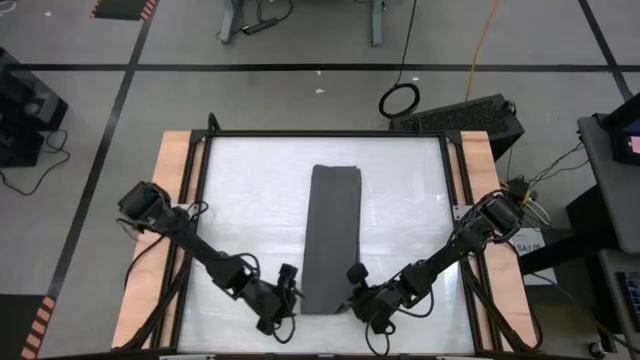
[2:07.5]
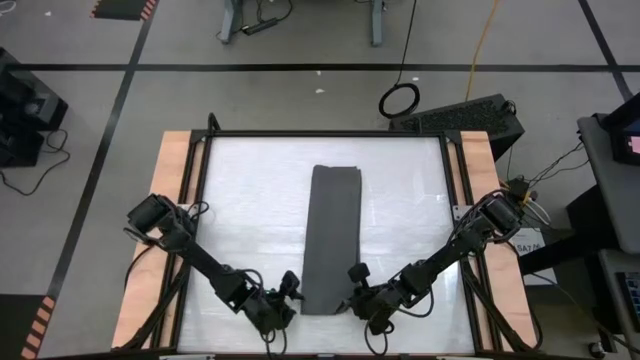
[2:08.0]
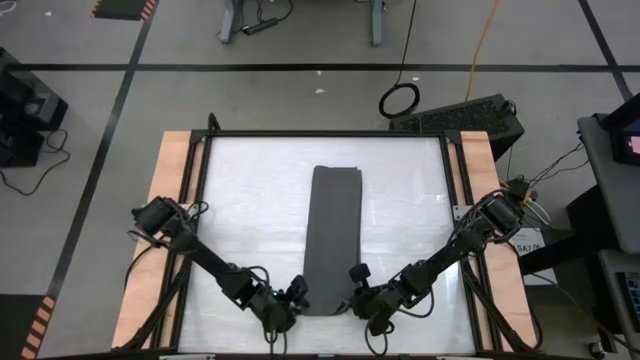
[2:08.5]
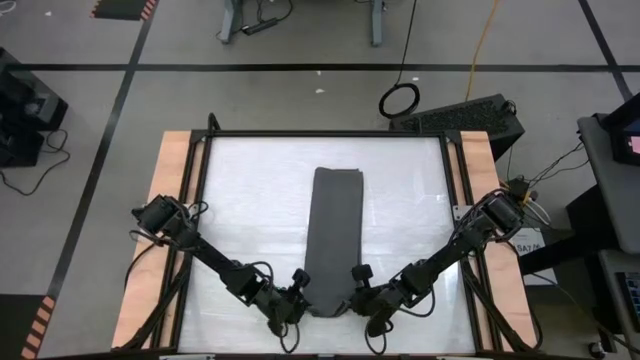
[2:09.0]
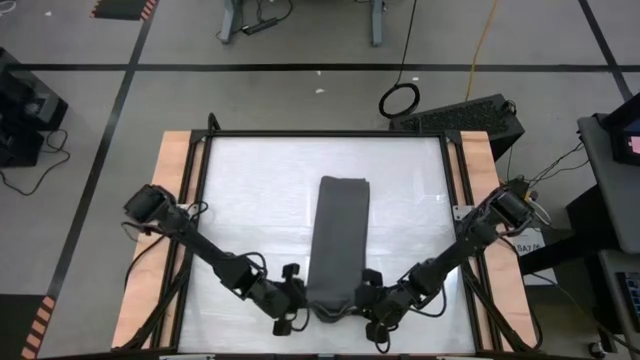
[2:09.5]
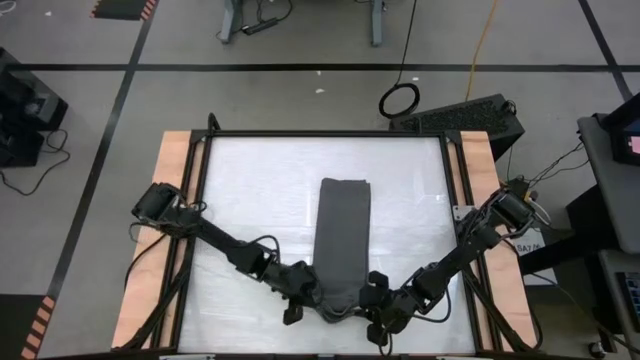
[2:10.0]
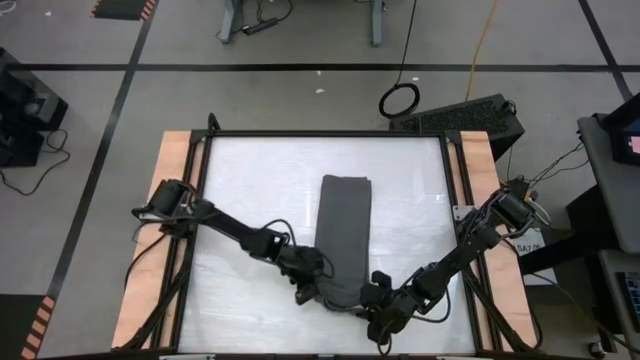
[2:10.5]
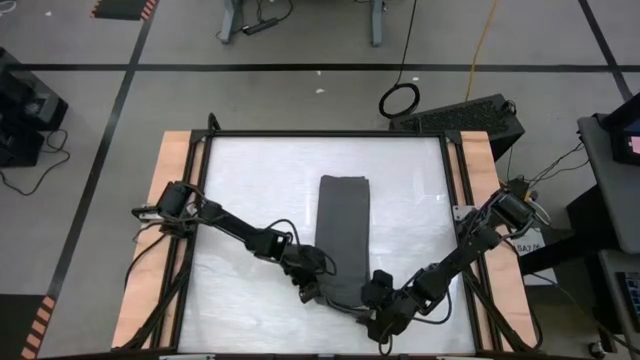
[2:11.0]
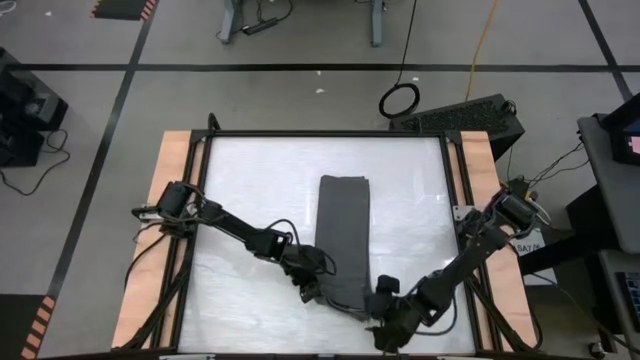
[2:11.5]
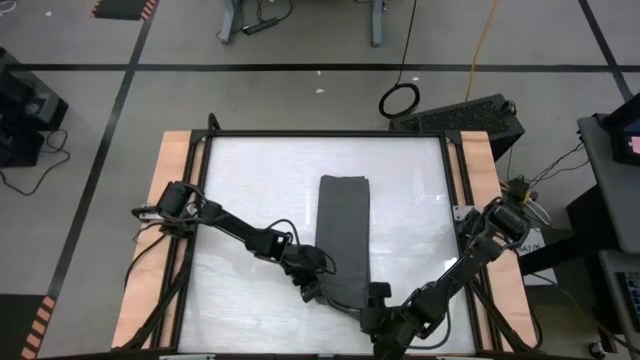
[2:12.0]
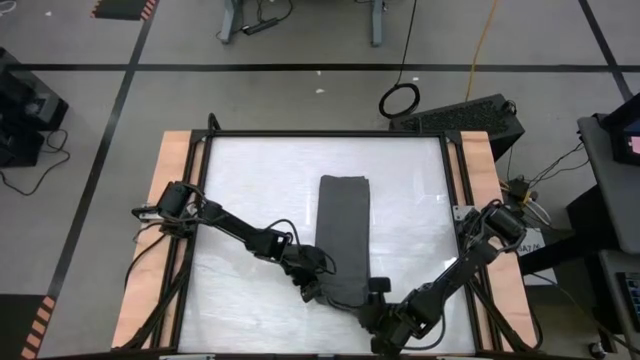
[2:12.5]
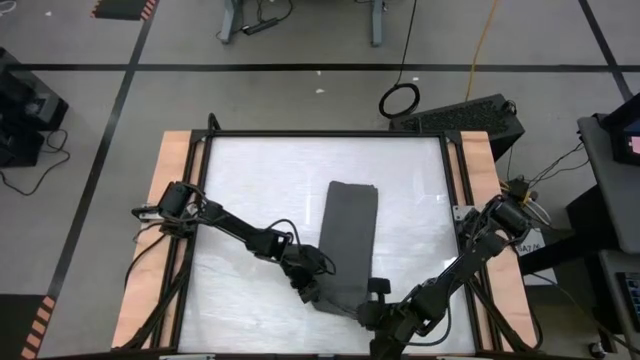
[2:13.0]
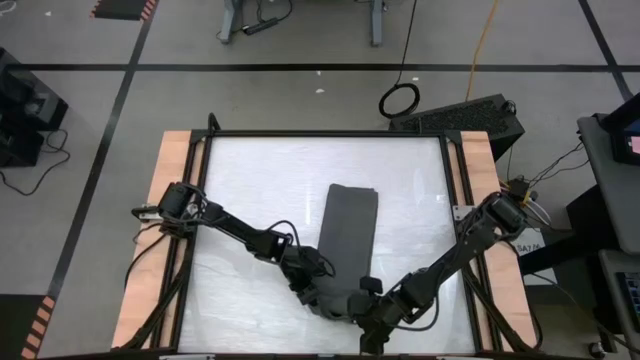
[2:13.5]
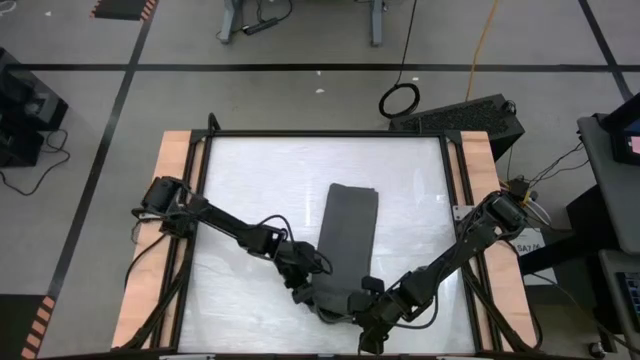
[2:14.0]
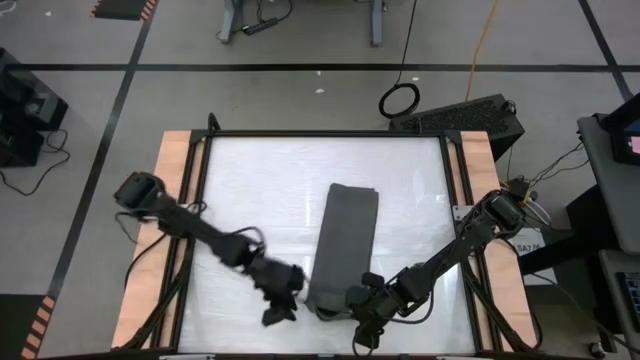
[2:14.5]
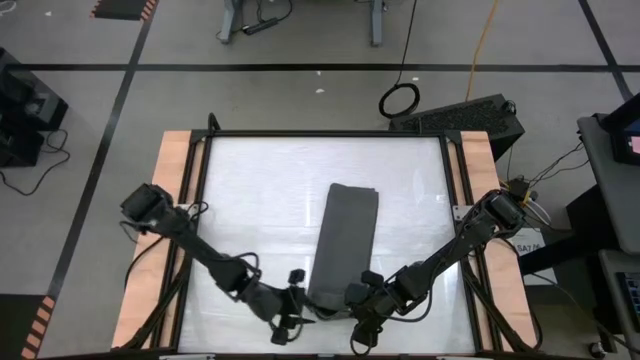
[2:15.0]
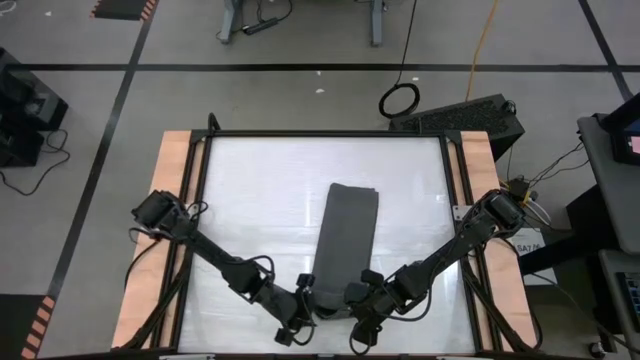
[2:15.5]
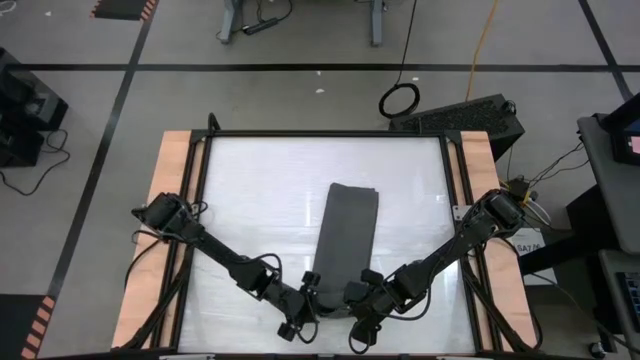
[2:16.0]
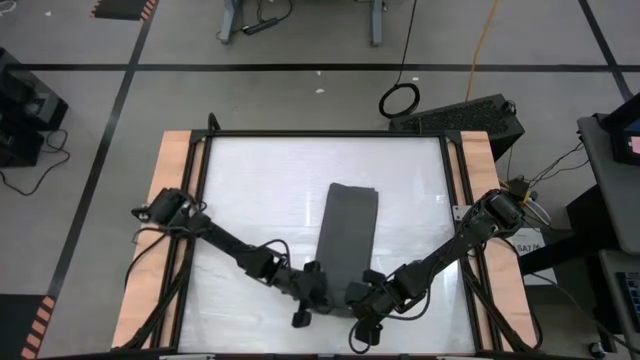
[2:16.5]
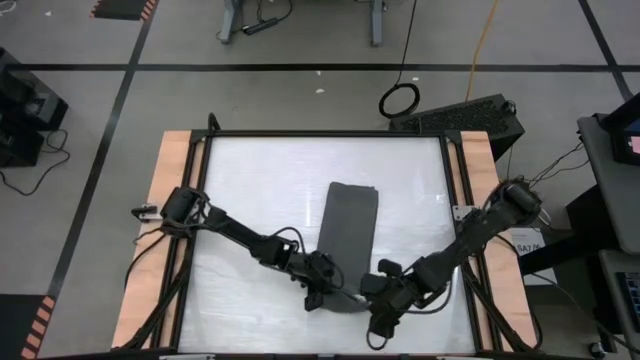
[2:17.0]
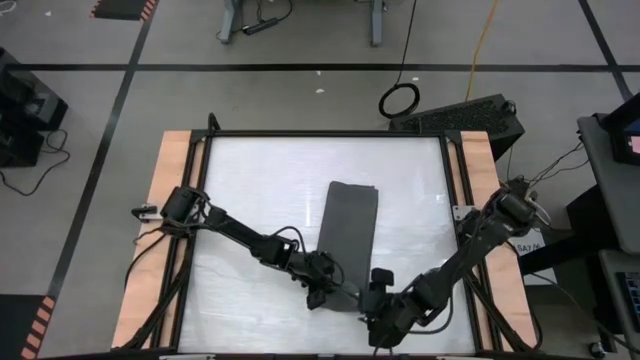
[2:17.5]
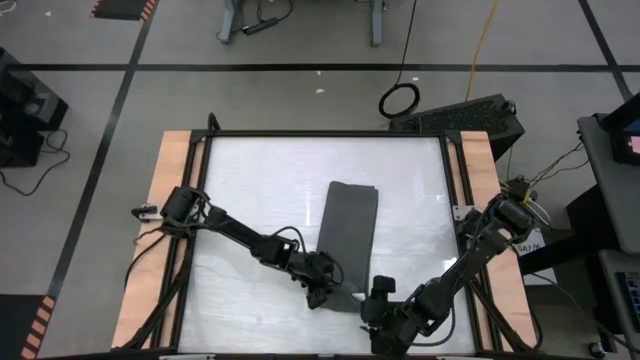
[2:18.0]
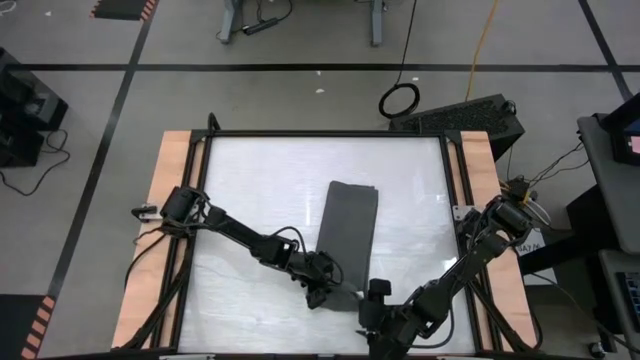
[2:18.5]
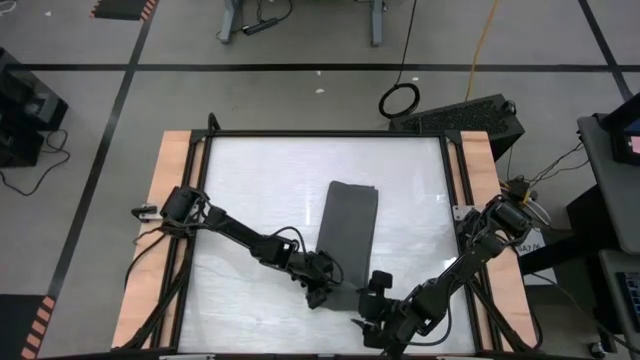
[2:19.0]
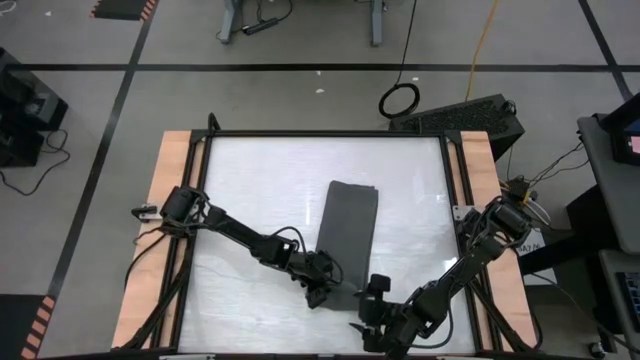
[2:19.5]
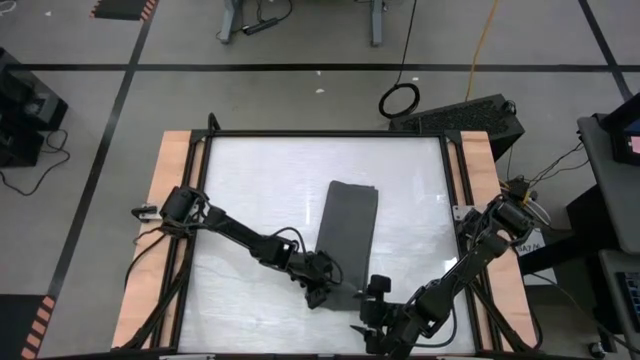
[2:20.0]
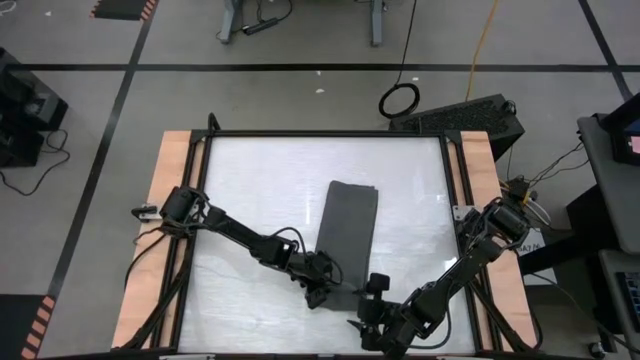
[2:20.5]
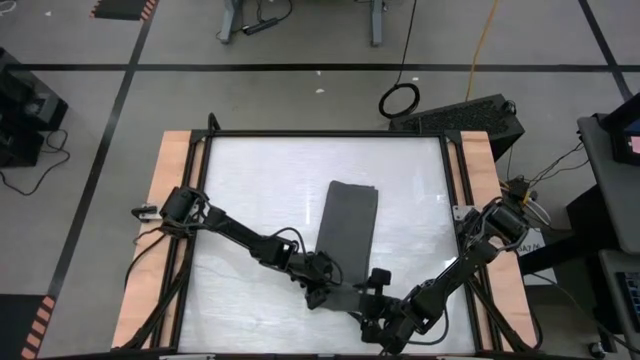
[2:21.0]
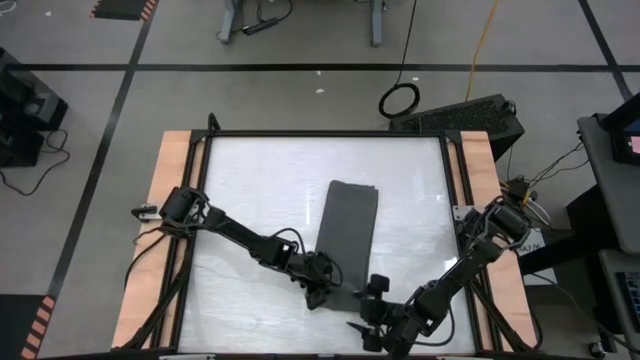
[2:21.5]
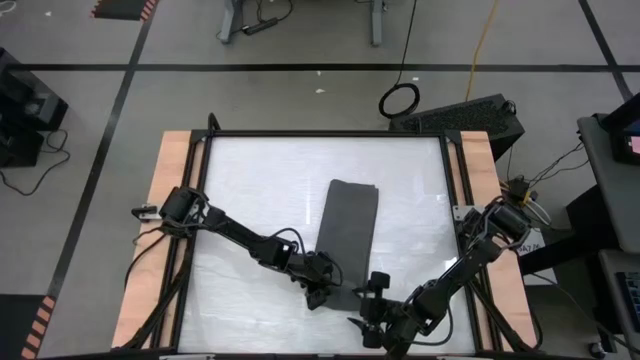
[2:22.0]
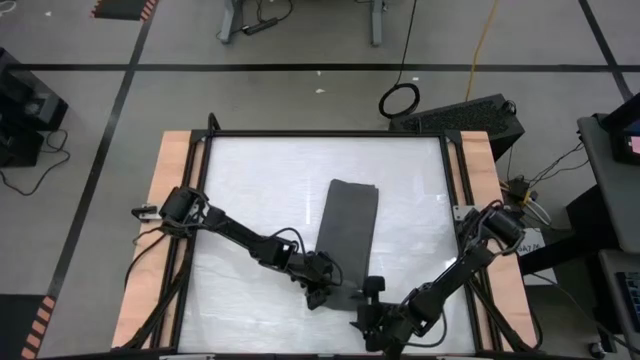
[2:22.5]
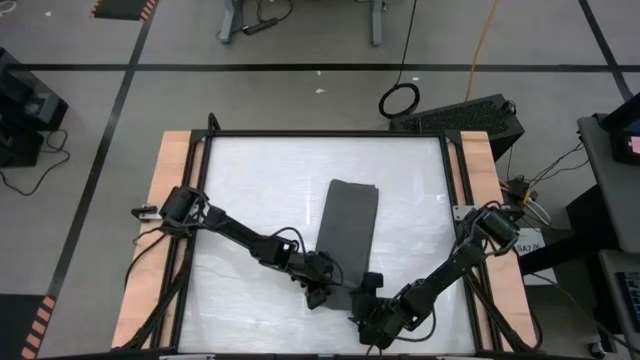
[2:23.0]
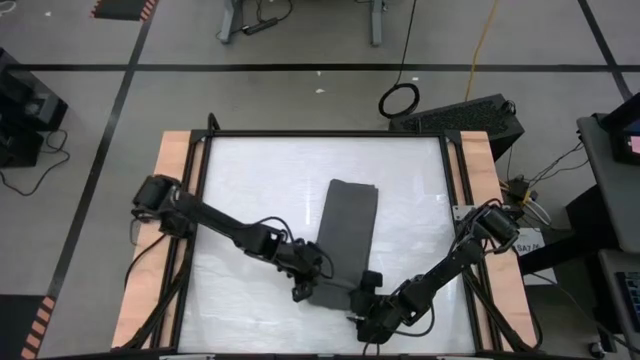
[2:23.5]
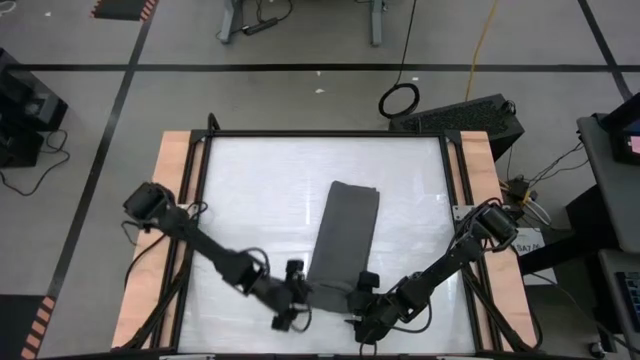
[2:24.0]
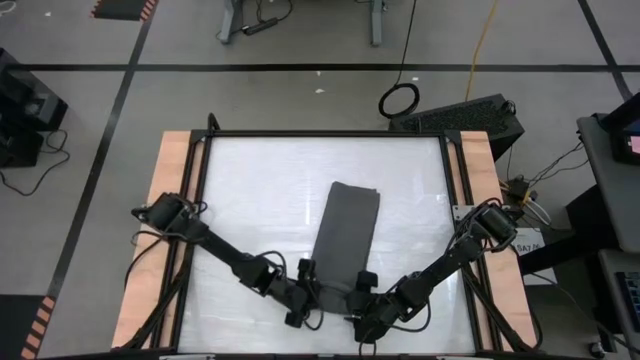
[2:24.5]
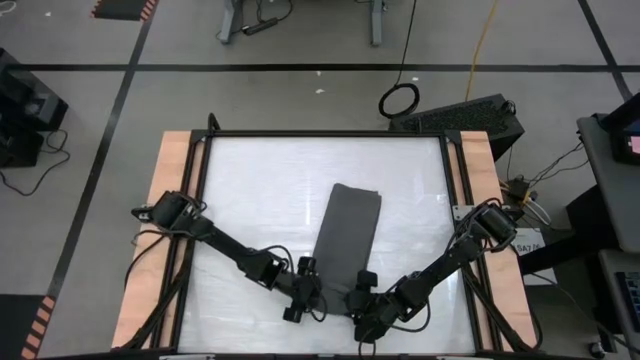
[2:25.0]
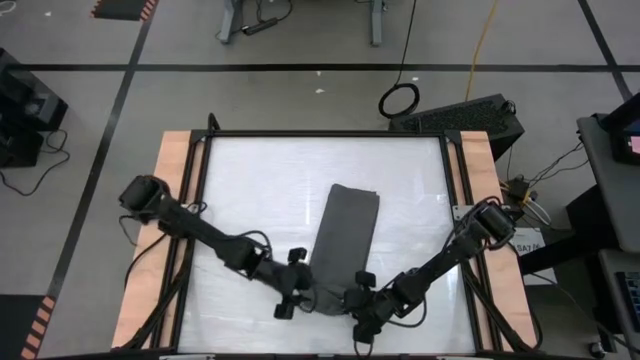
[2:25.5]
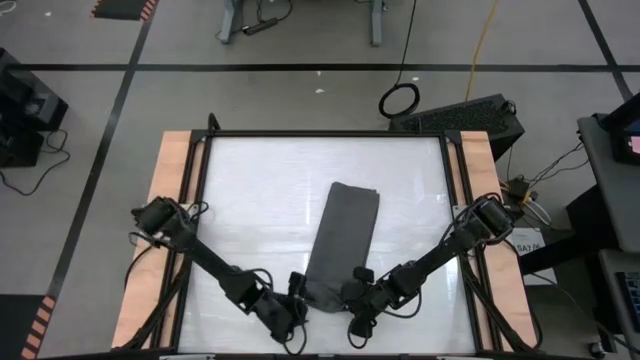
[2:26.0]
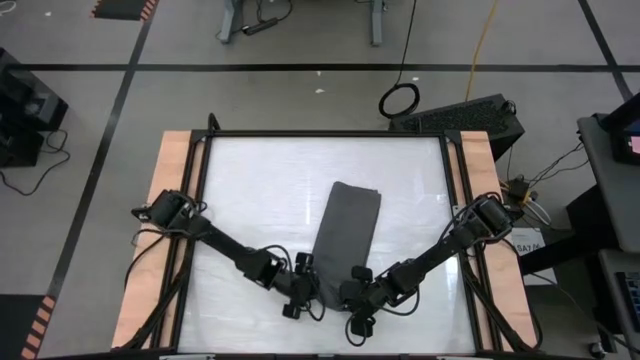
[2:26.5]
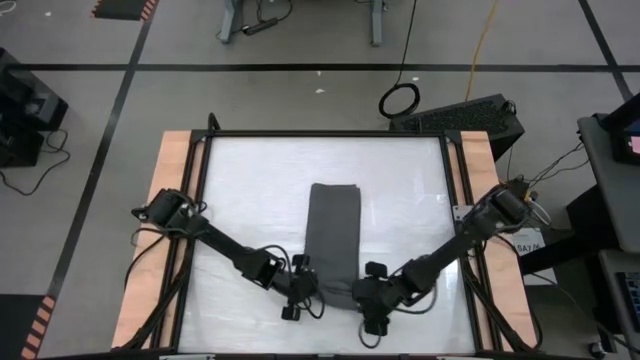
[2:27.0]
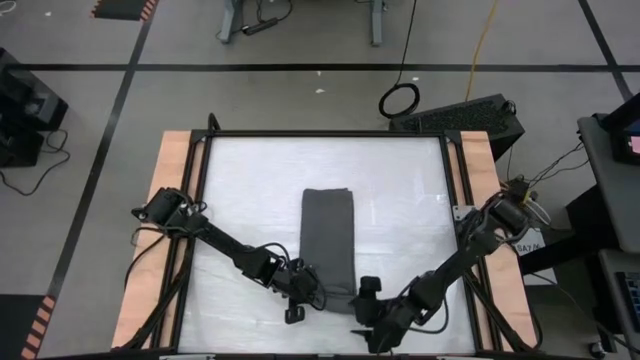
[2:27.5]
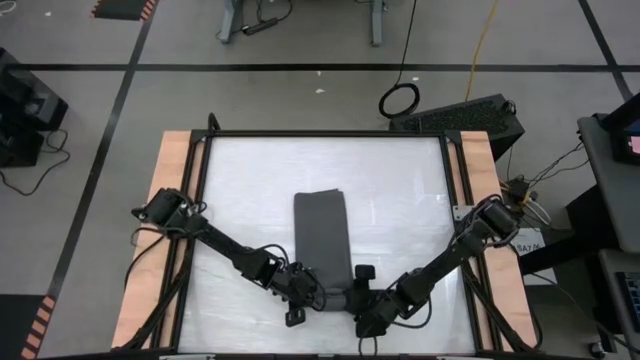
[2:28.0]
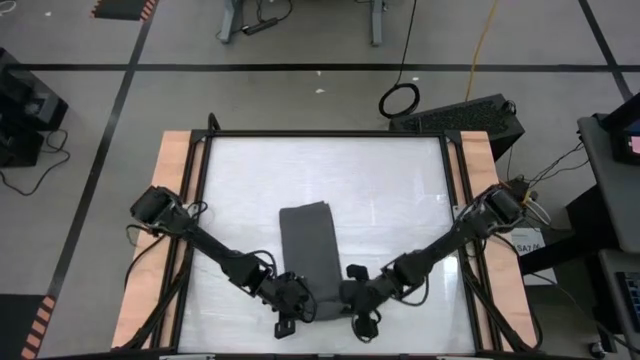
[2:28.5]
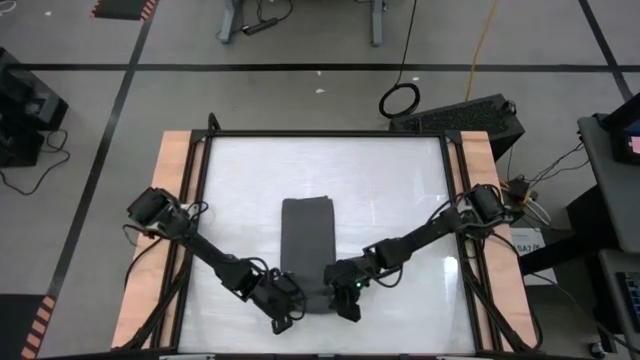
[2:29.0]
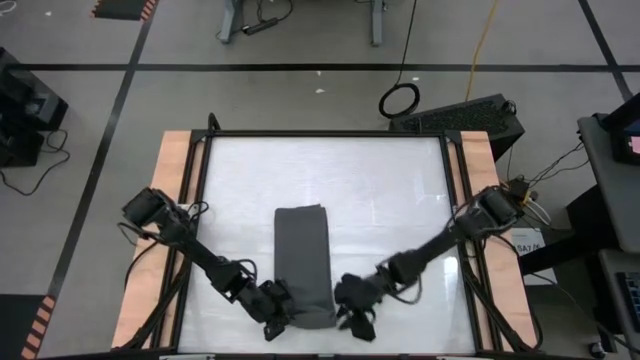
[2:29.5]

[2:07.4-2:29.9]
Task: Roll towel into tight, uniform cylinder
Roll the gray towel
